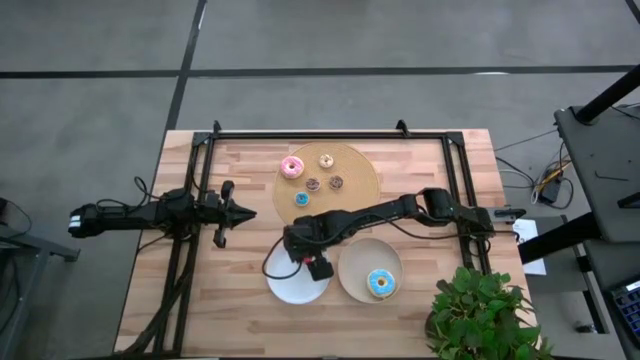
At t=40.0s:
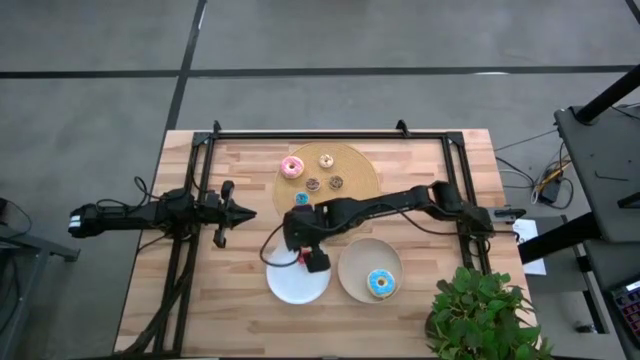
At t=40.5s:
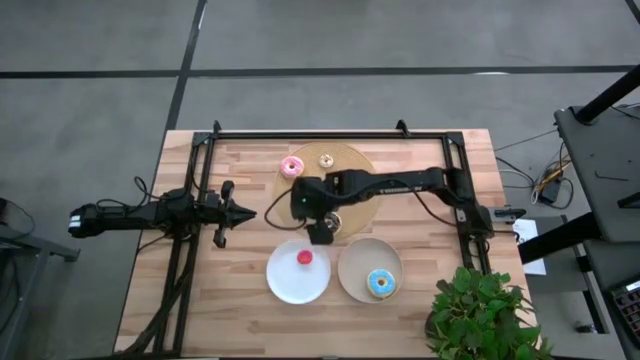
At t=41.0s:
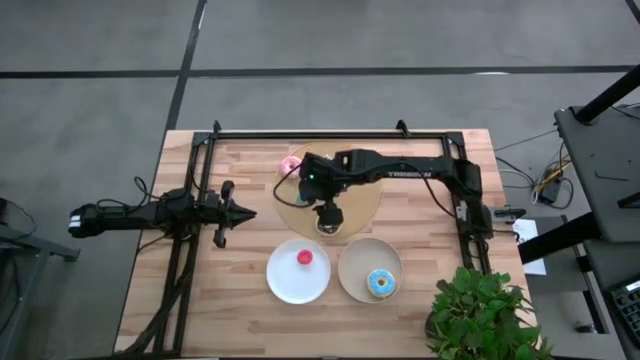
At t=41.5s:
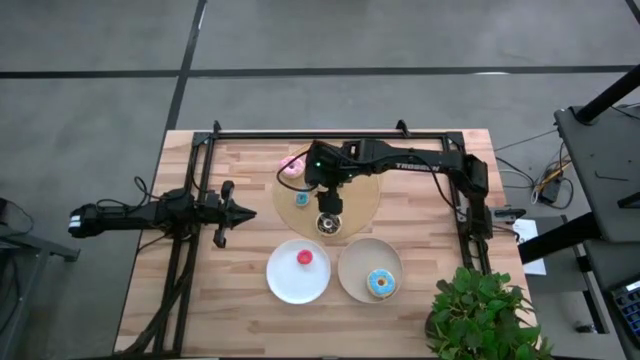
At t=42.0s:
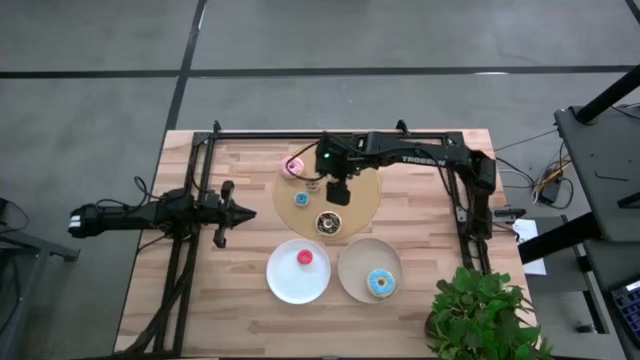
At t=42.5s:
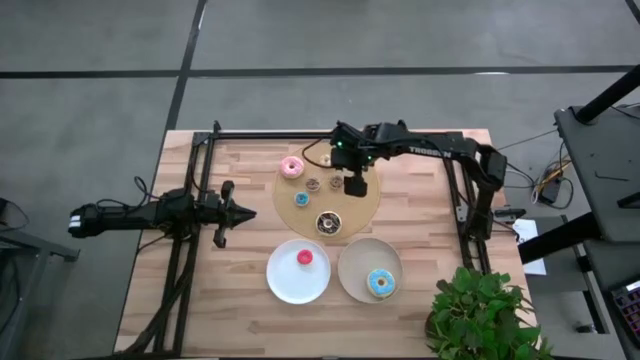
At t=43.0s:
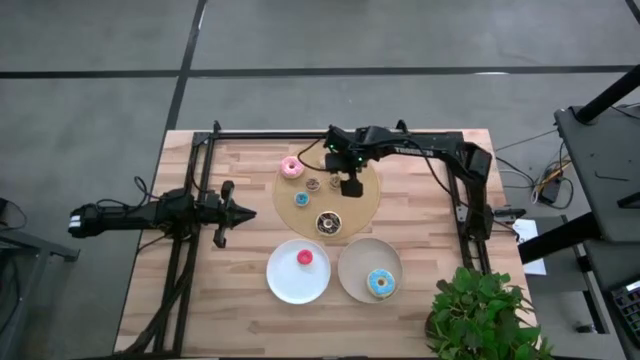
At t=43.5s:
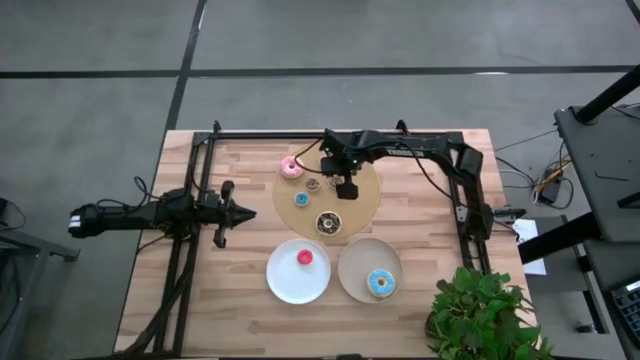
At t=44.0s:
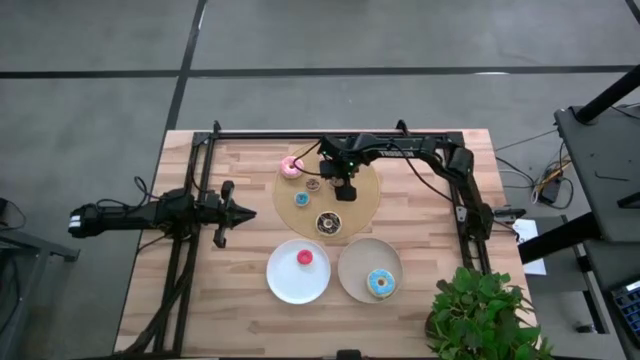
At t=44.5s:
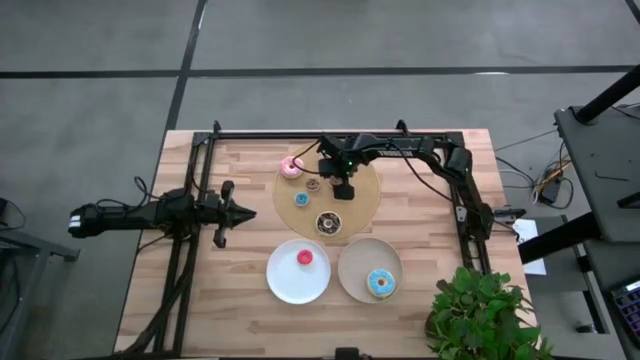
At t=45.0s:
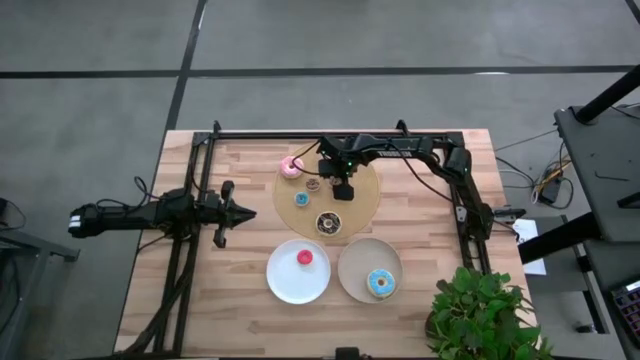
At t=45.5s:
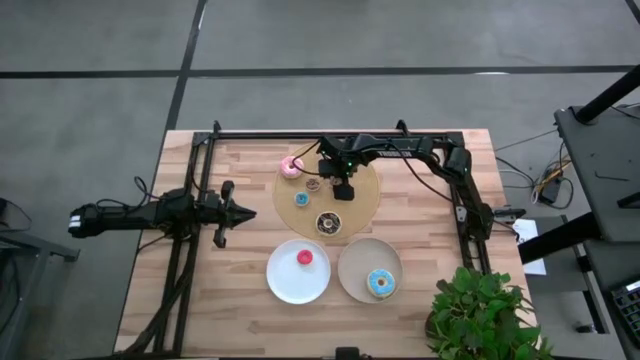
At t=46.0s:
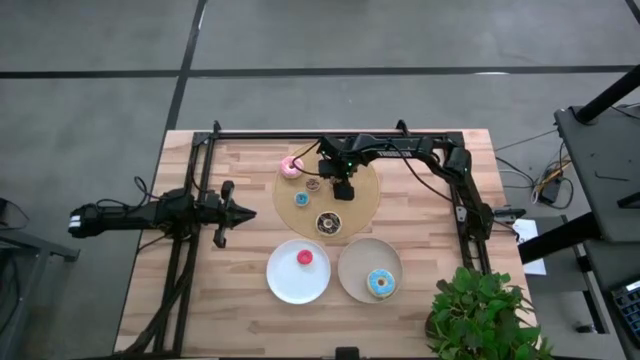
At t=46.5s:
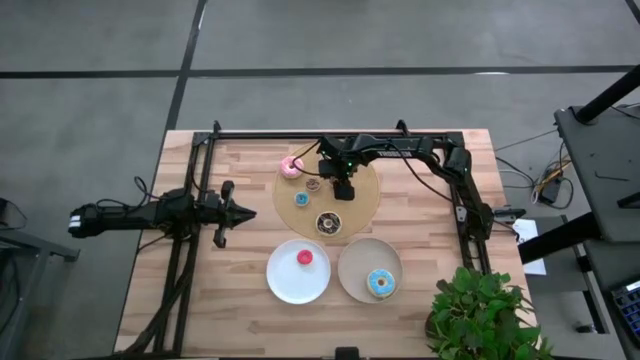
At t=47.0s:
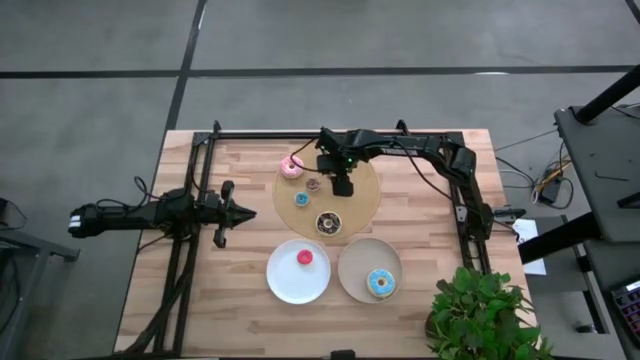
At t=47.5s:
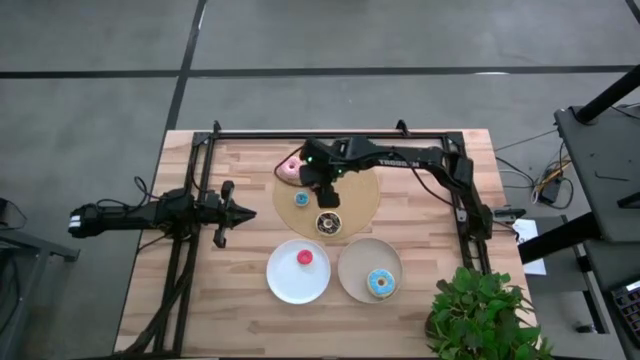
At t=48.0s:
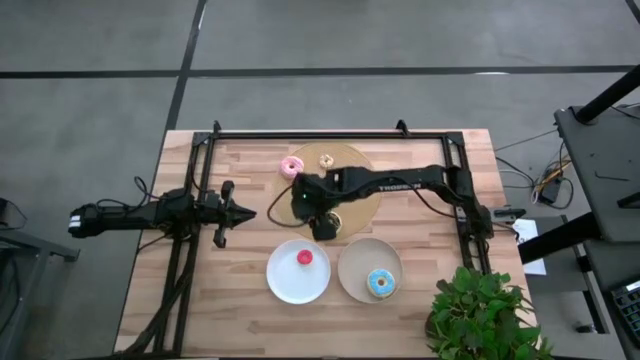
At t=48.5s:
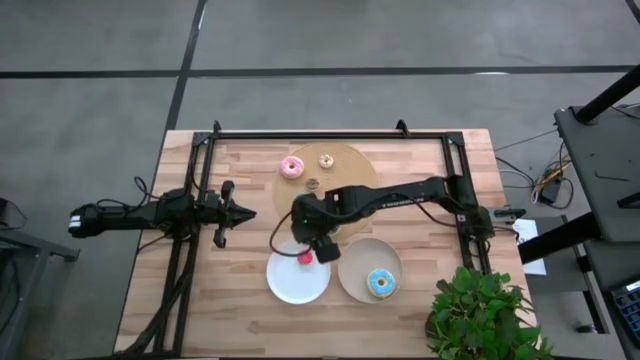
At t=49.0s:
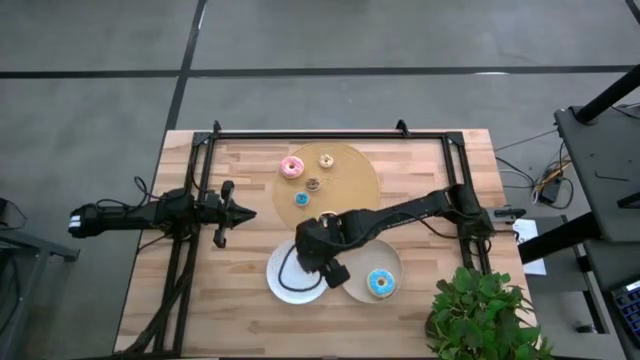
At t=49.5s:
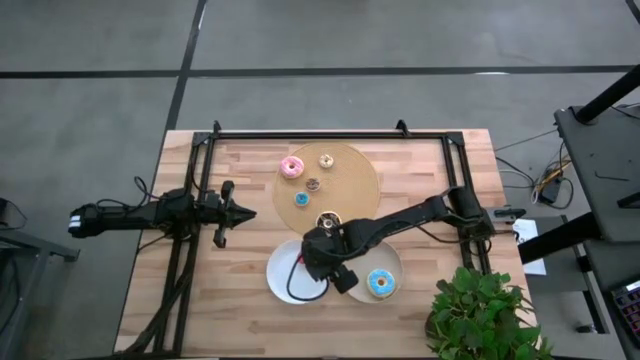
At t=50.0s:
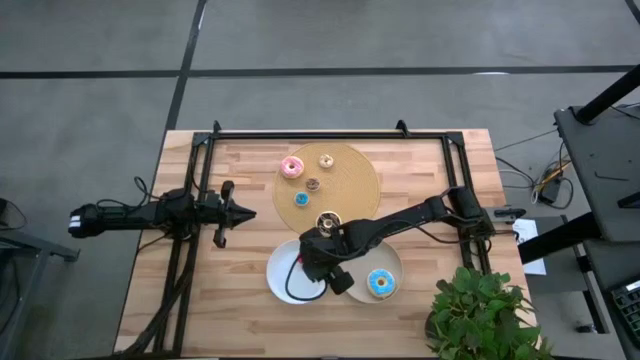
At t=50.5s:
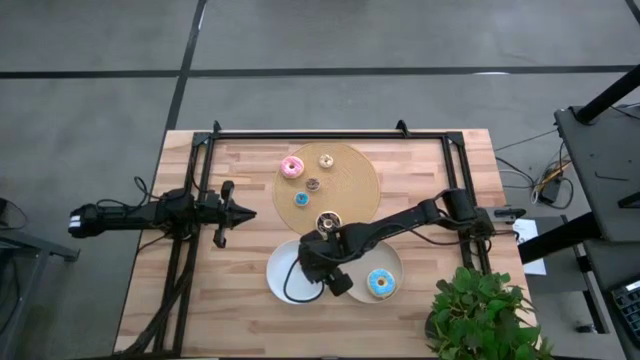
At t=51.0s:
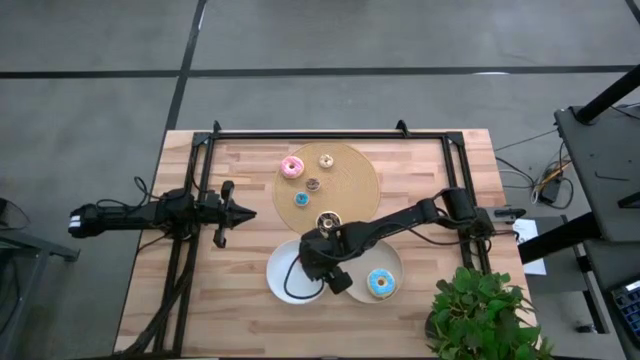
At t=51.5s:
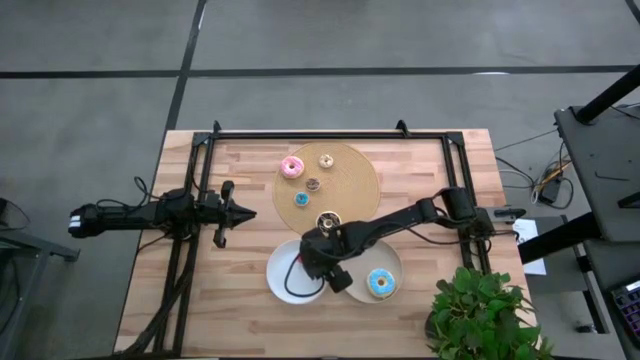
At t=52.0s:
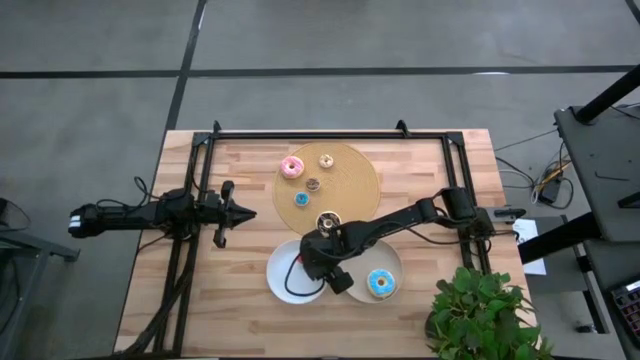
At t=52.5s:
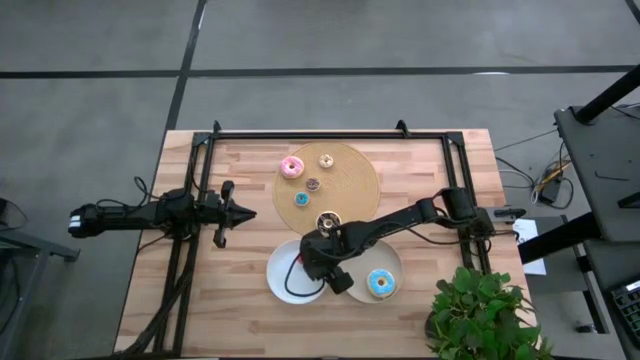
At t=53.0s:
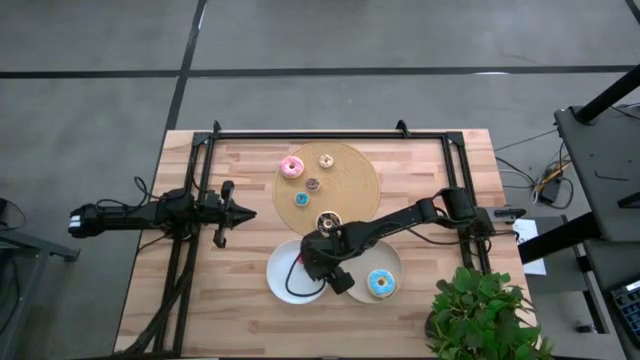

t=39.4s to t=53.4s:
Task: Pick & Place donuts
Put the right small brown donut on the white plate

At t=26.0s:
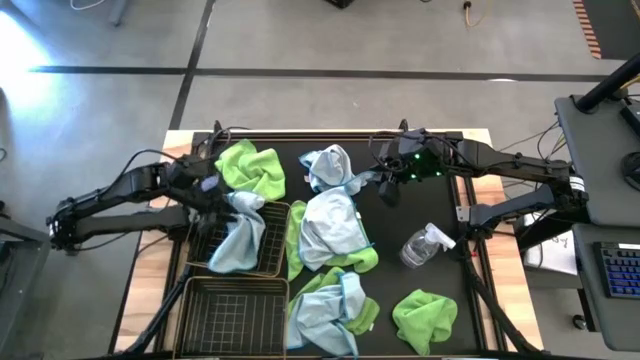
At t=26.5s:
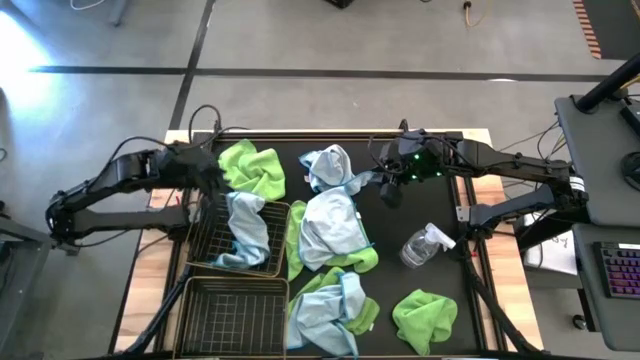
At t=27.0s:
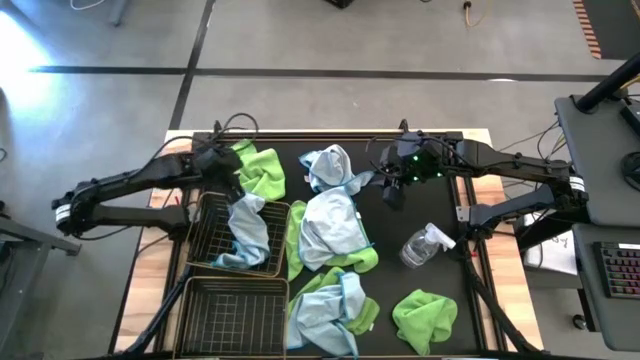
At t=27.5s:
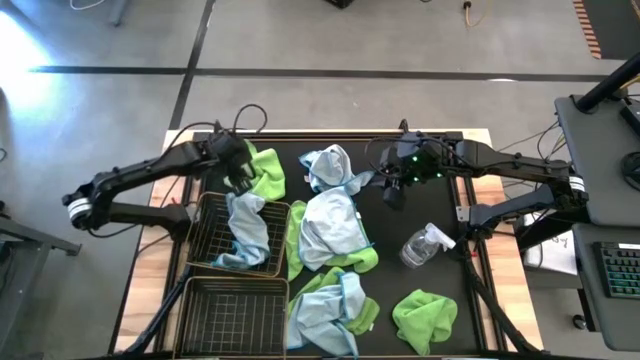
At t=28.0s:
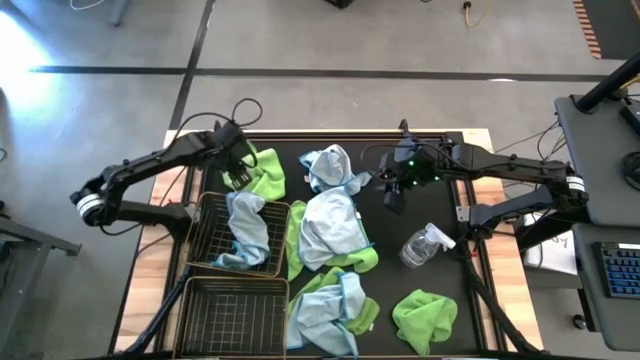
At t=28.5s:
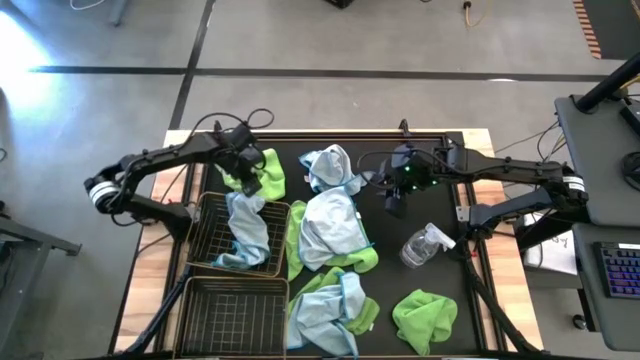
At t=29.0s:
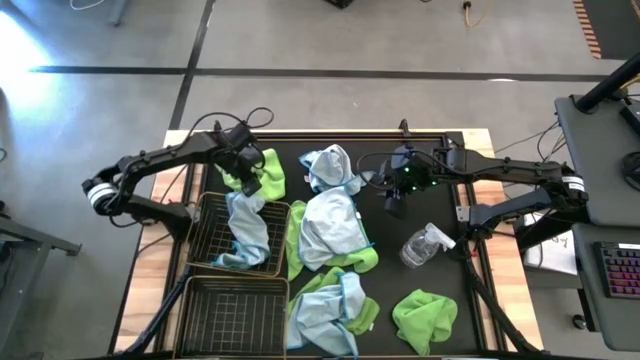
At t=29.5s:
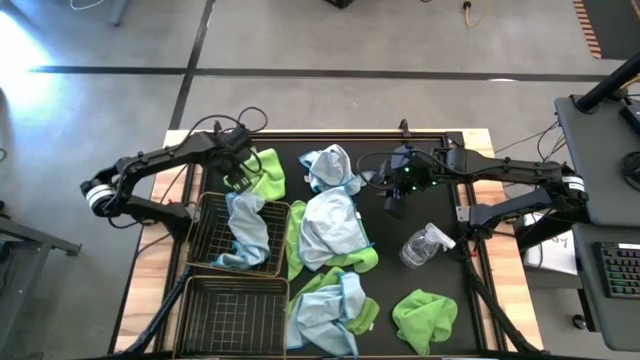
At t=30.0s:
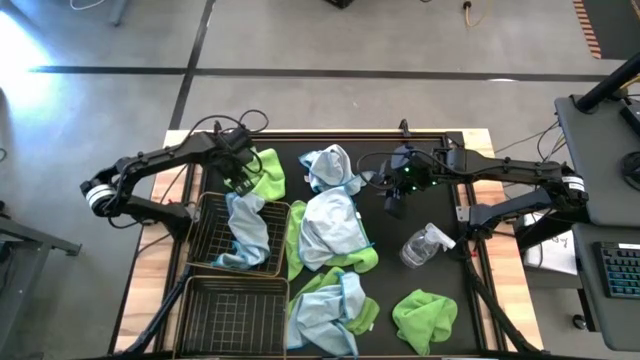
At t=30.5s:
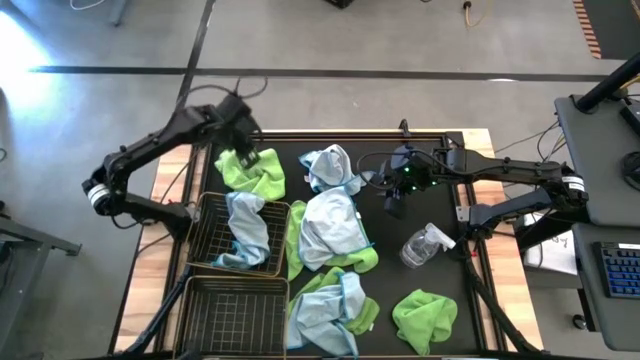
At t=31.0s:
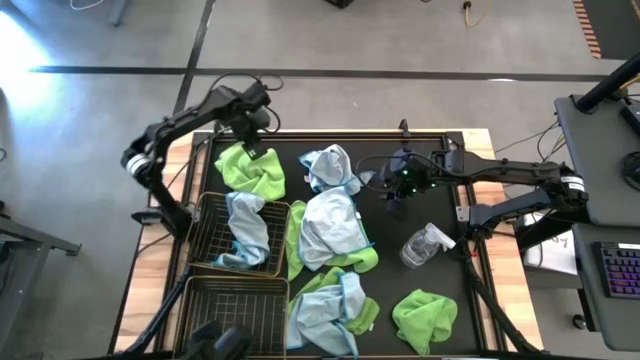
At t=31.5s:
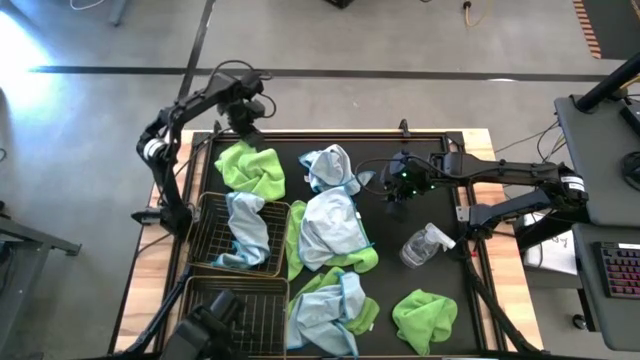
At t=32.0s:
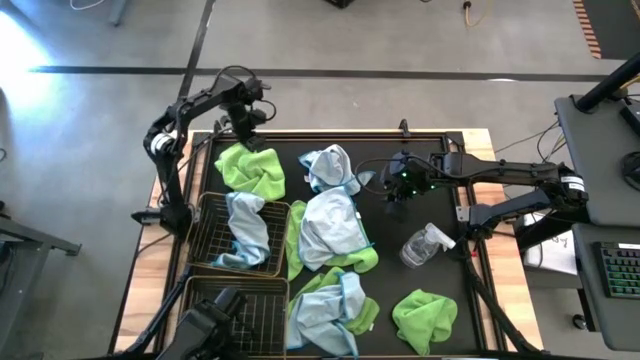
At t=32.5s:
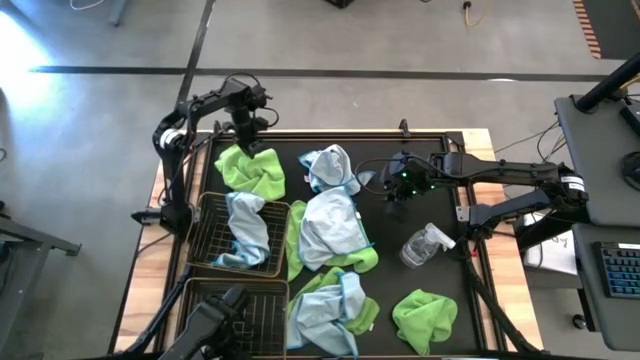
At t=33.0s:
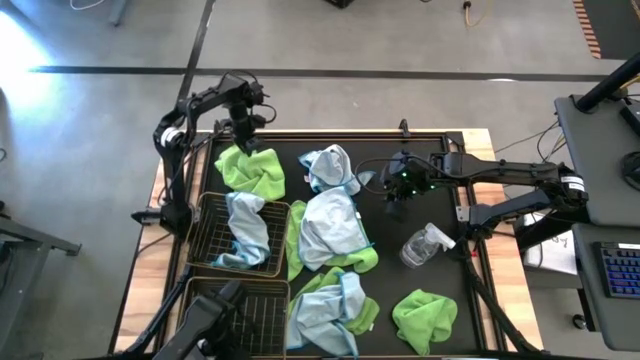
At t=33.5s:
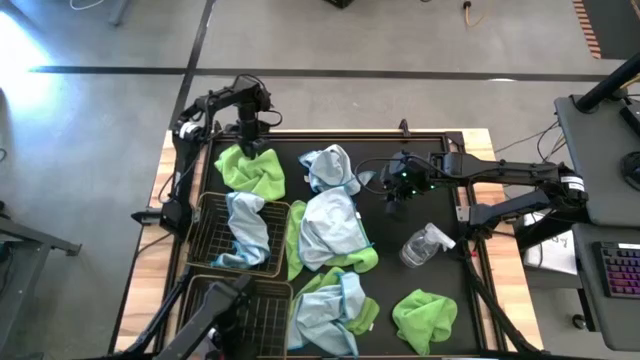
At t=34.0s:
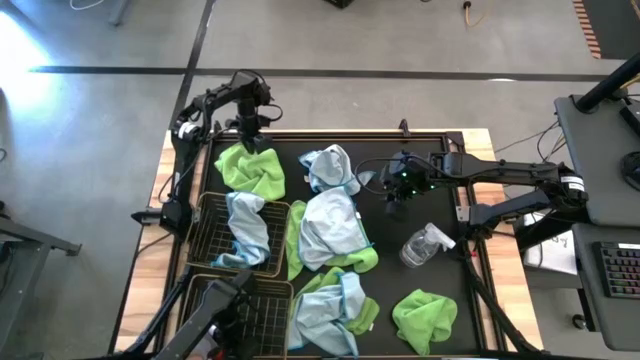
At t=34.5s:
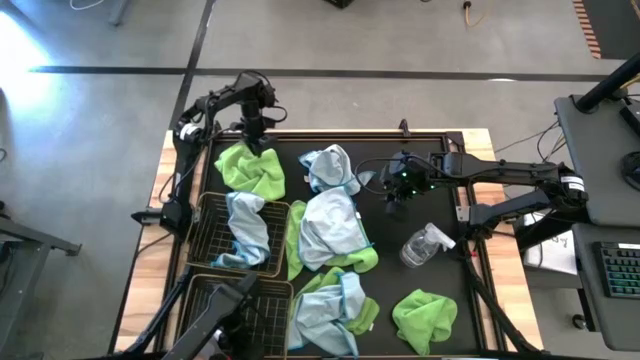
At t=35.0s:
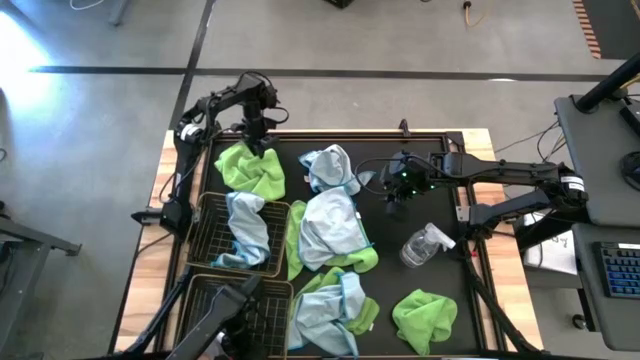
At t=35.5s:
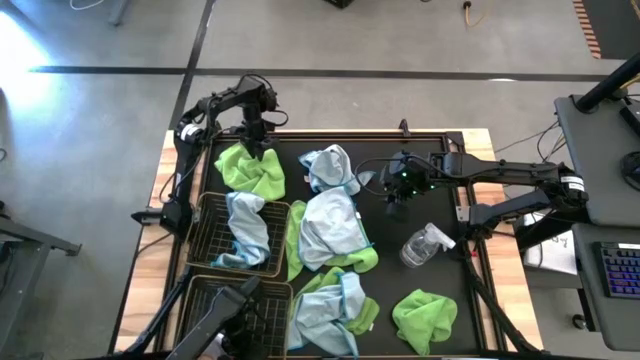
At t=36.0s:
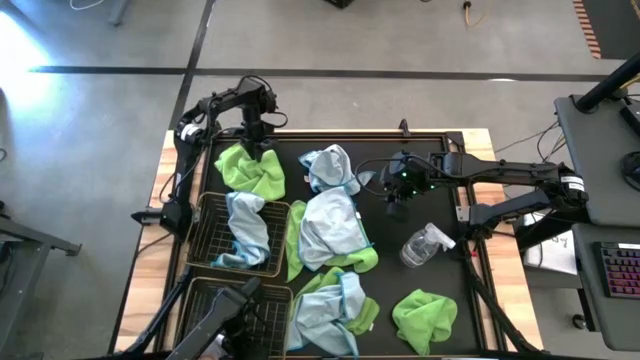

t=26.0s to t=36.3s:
Task: Sort microfiber towel by color & place in baskets
Put the top left green towel into the bottom wire basket
